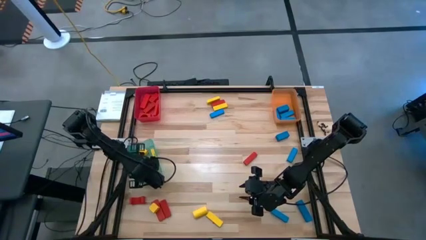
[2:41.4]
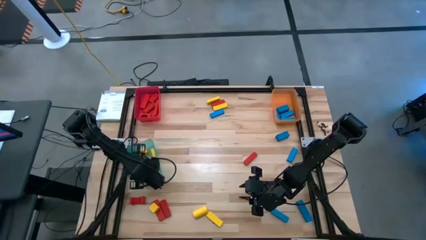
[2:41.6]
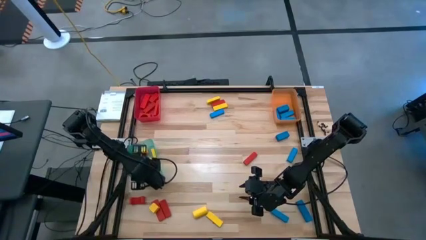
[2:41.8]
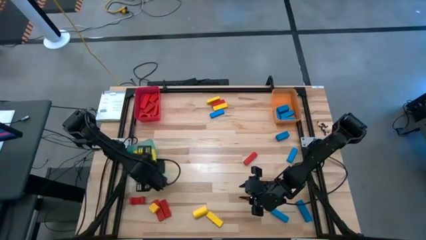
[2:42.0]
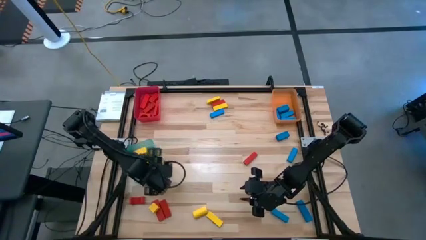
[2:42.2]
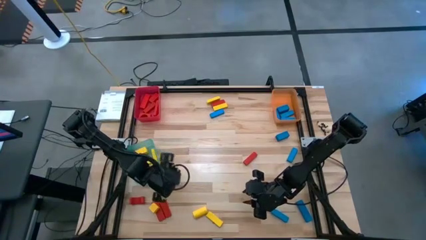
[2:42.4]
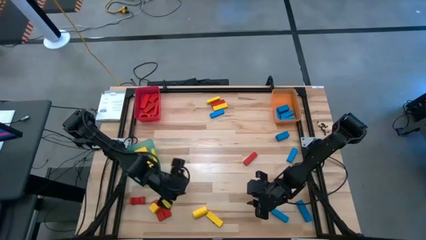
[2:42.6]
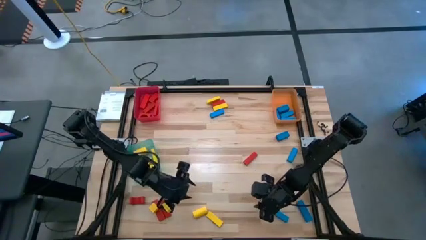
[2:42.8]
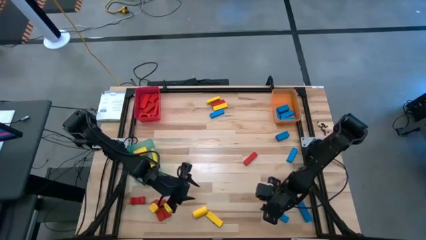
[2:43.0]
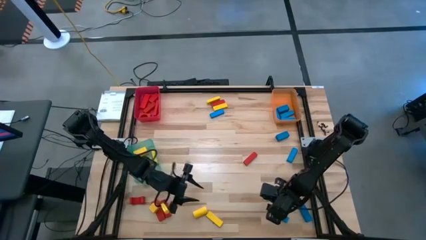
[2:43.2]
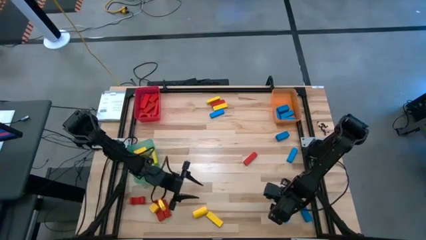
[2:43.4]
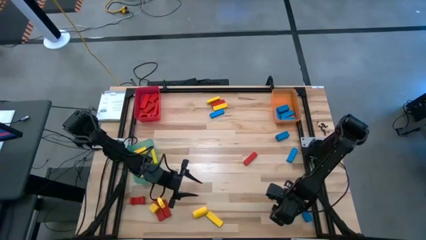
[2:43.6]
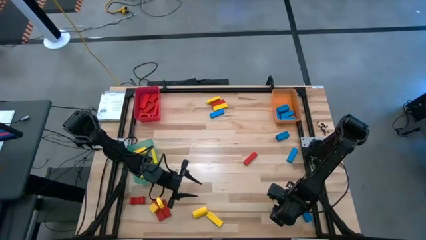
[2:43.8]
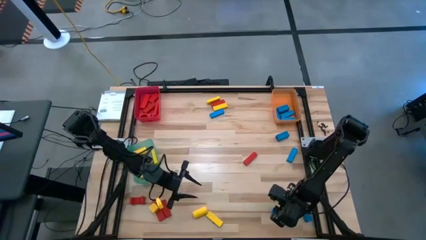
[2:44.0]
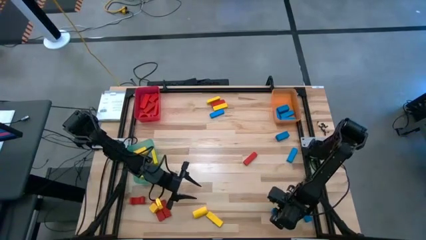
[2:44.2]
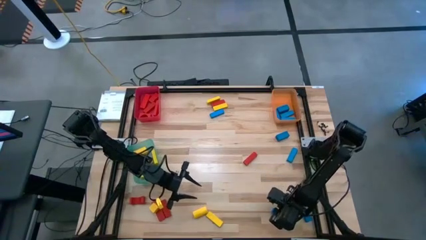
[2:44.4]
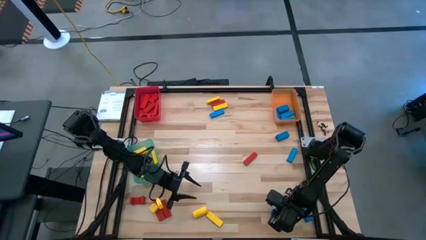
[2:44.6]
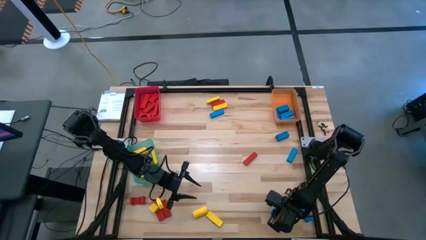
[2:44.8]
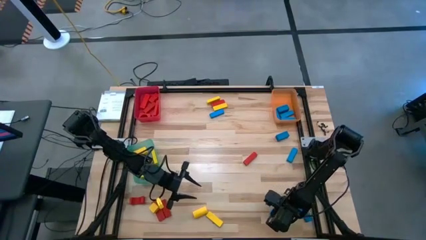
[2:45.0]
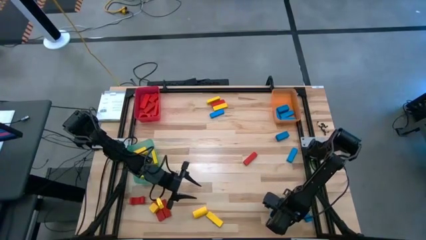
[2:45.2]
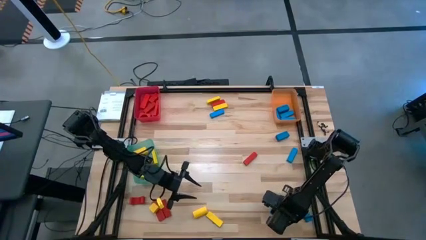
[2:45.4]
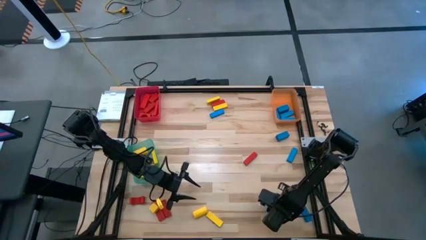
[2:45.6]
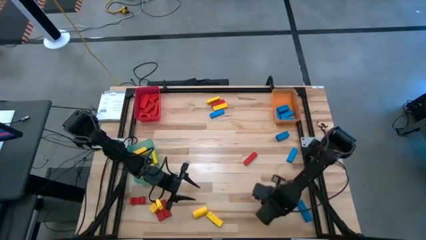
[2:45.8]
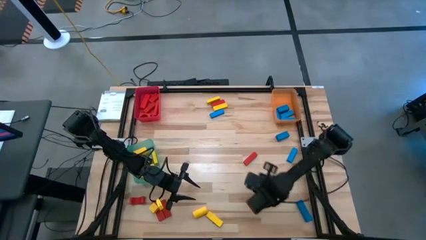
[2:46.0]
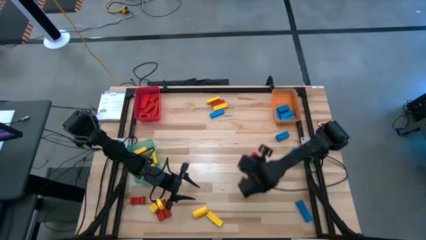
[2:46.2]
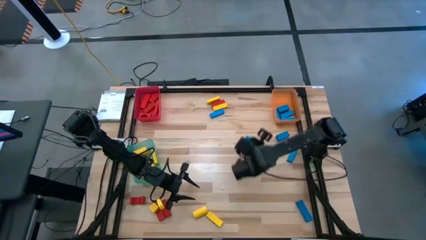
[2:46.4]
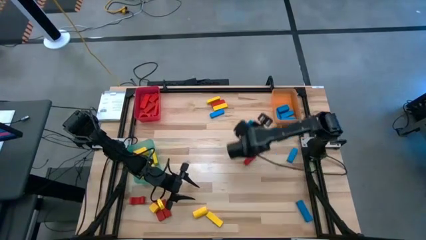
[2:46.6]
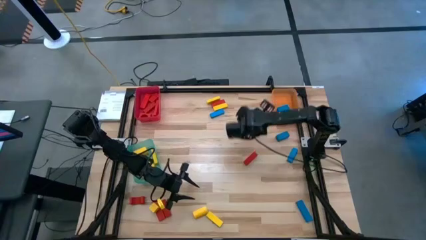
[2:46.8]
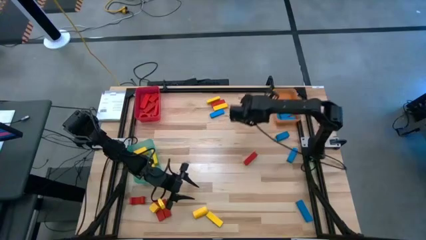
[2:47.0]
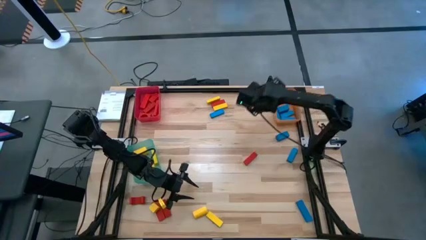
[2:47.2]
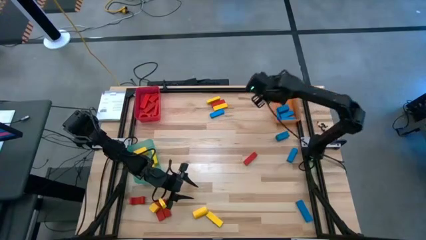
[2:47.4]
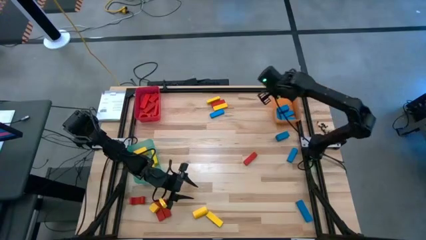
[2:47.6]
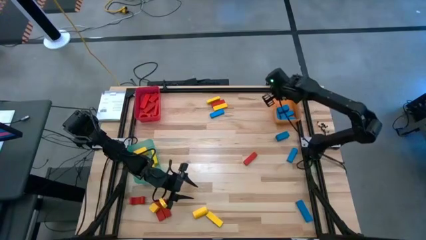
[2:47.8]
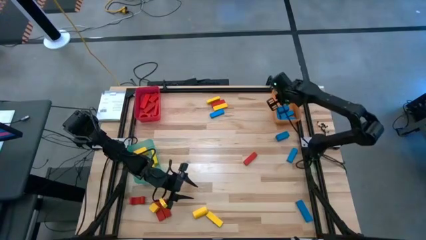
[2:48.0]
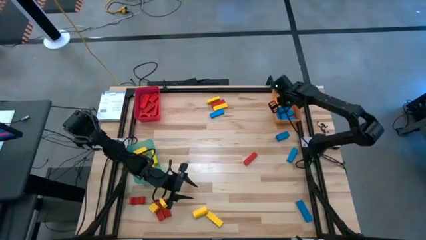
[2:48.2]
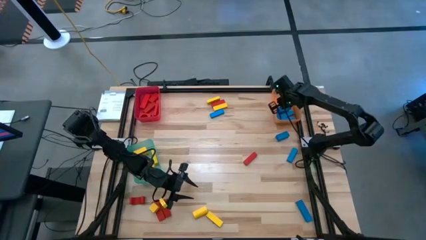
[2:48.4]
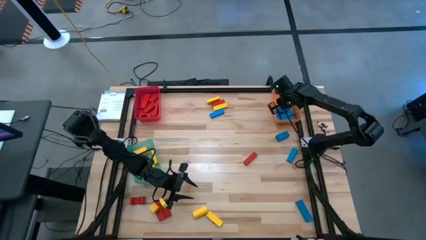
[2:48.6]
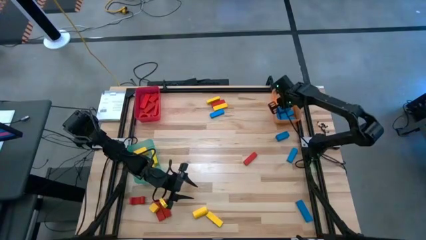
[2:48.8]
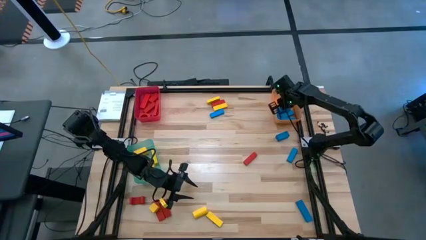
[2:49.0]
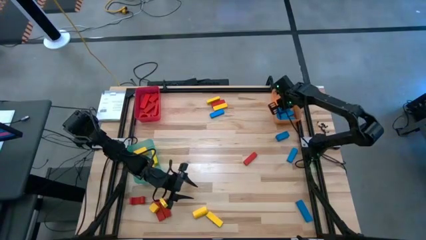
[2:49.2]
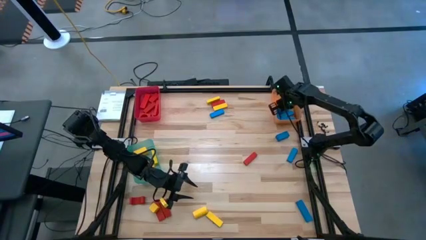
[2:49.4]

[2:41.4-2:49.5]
Task: Sort blocks
Put the blue block into the orange bin

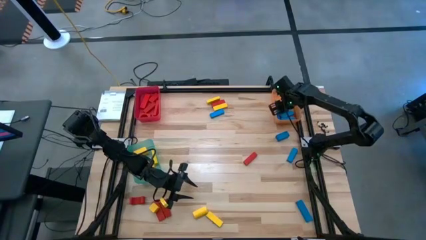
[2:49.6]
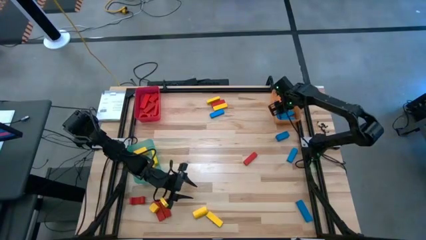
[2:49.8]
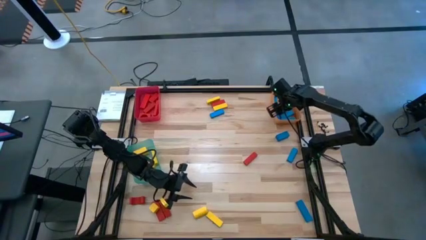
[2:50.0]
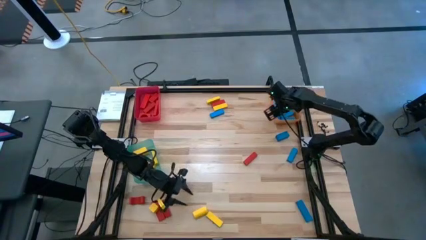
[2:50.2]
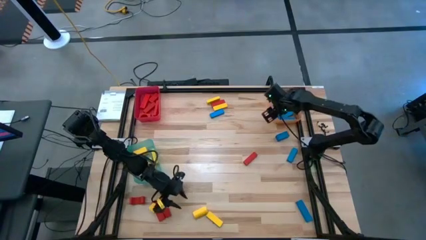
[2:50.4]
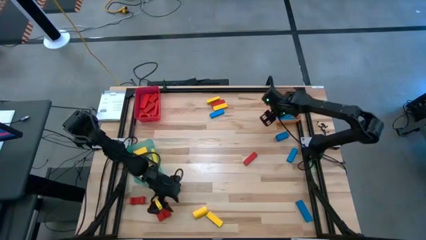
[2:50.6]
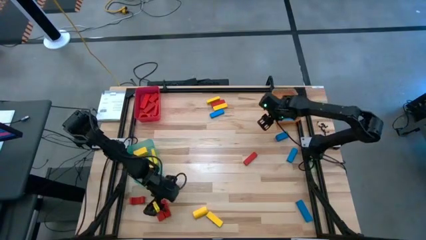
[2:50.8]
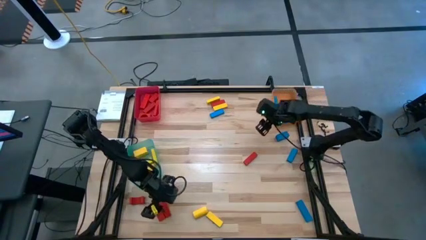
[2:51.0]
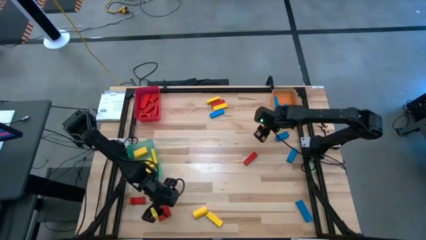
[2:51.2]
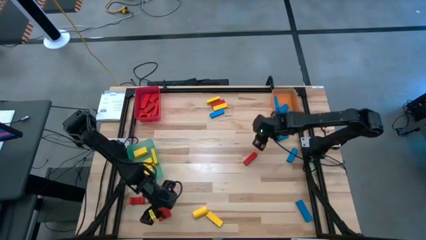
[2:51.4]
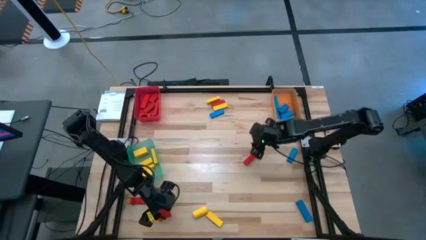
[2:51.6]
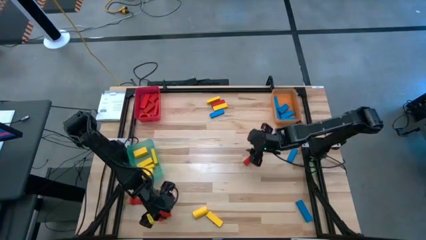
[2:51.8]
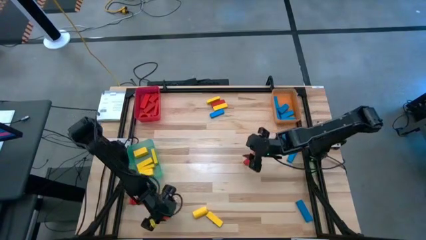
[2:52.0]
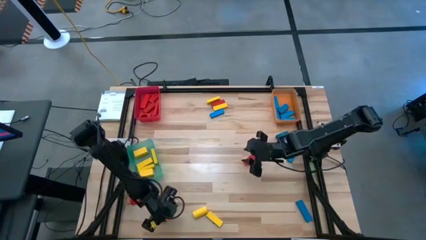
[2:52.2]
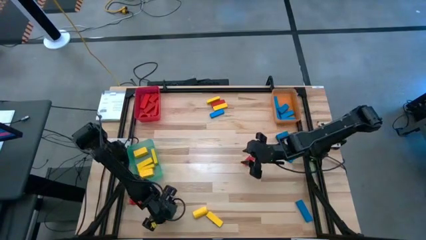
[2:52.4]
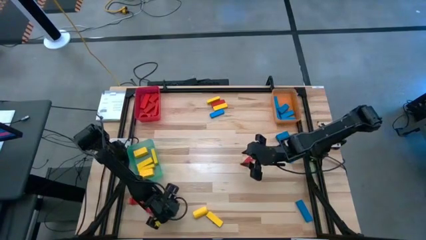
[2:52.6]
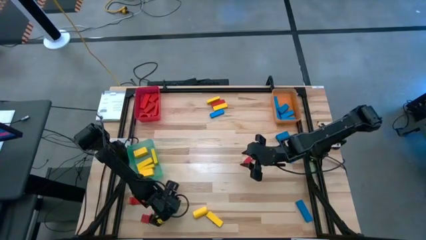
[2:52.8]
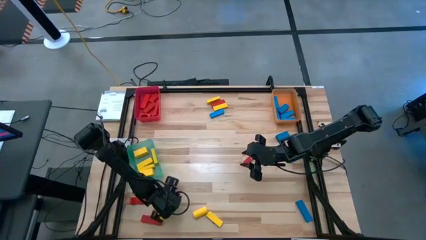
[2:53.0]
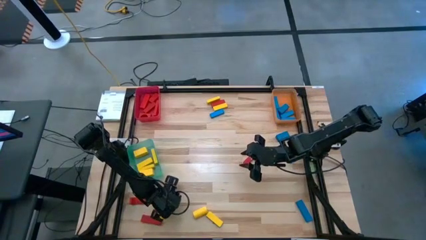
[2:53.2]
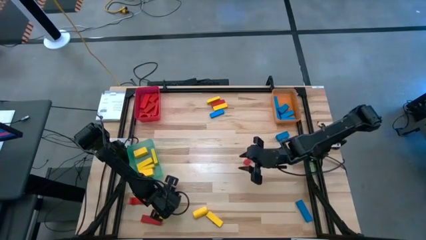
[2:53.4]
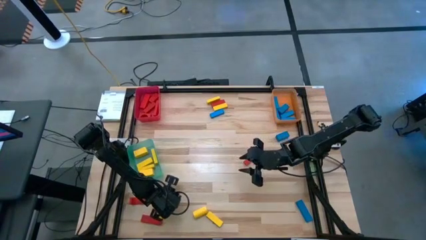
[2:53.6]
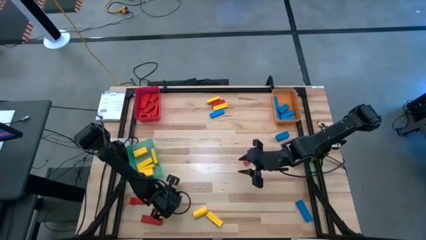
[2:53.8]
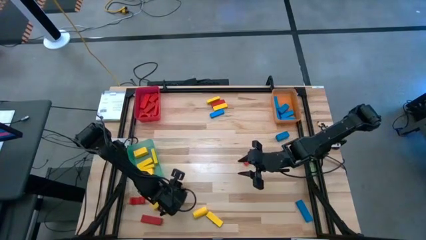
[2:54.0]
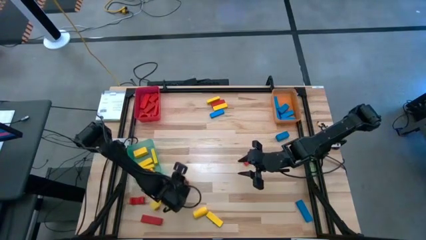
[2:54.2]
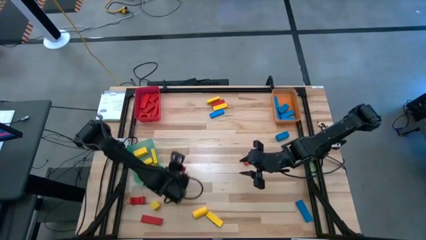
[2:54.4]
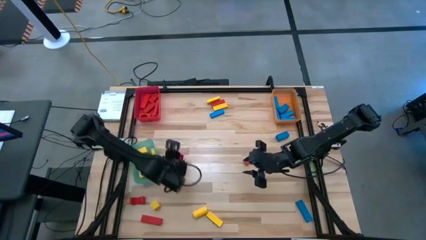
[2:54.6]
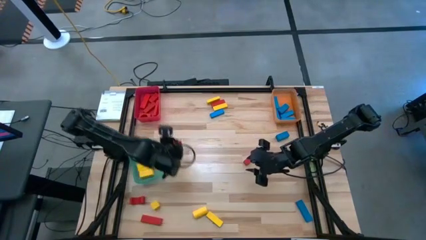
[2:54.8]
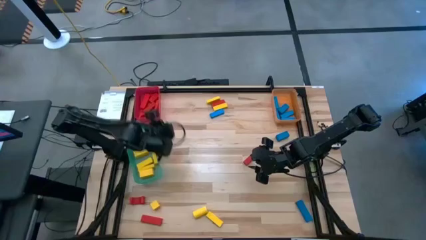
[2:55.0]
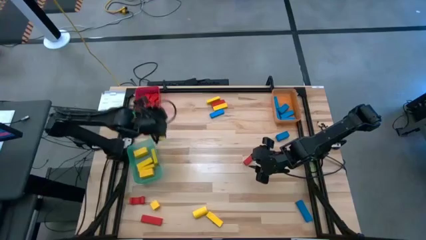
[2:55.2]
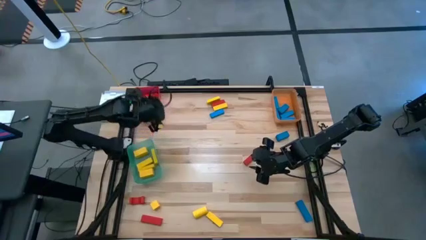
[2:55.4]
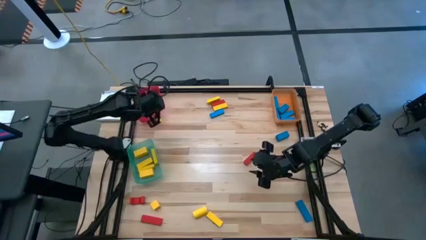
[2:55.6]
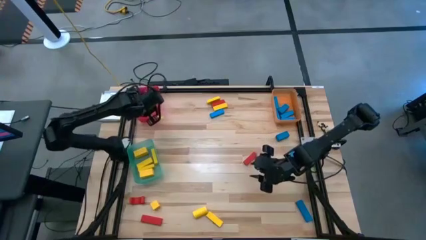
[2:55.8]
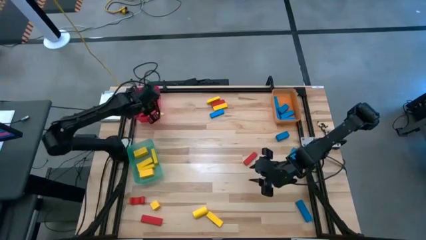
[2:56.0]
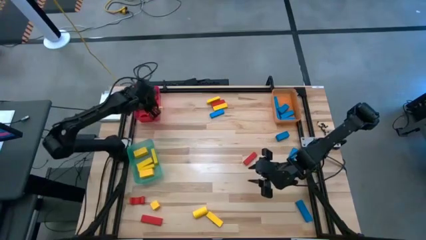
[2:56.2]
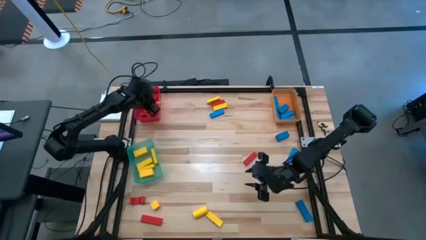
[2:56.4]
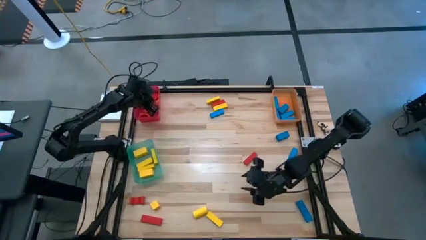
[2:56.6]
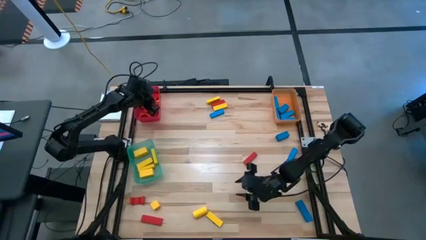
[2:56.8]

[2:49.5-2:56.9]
Put the red block into the red bin
